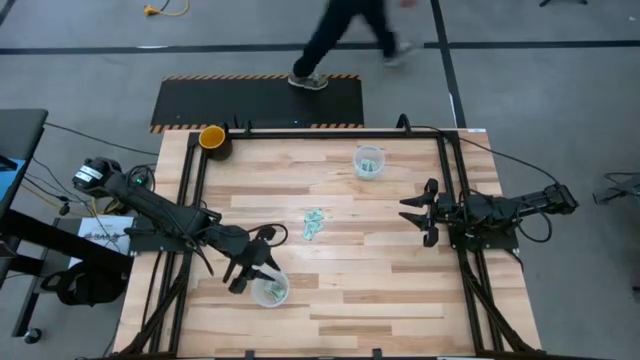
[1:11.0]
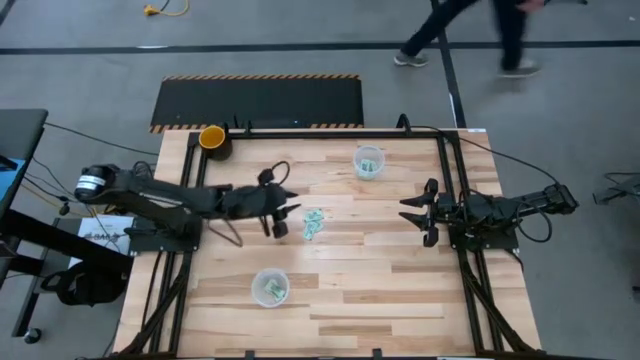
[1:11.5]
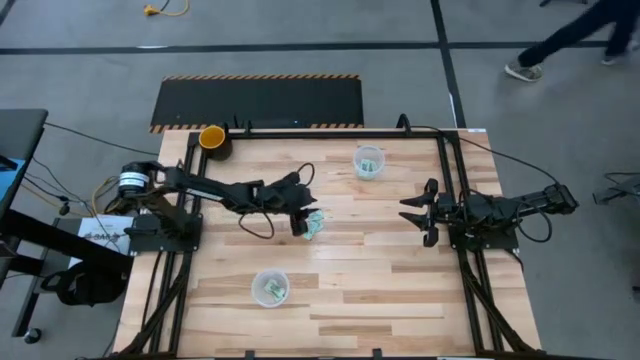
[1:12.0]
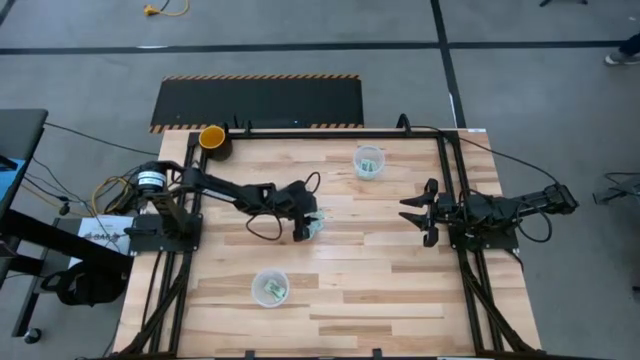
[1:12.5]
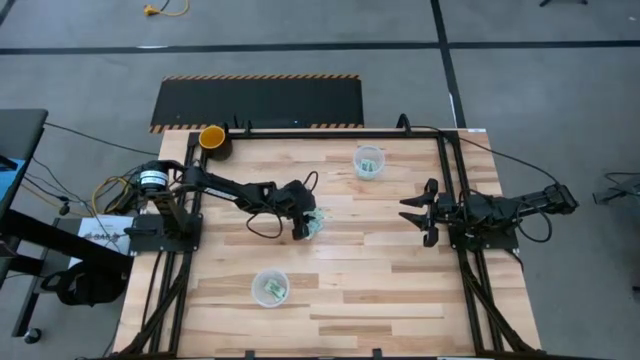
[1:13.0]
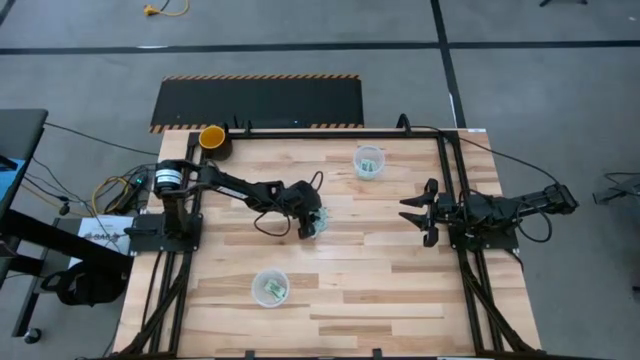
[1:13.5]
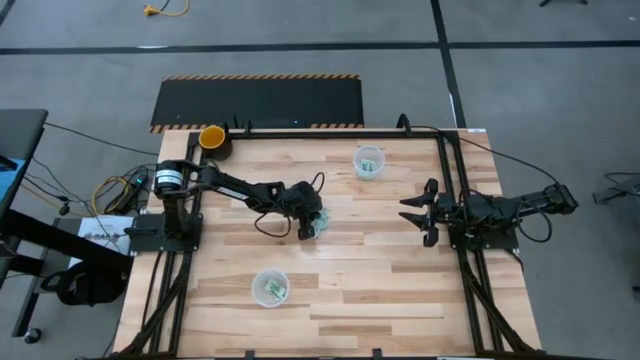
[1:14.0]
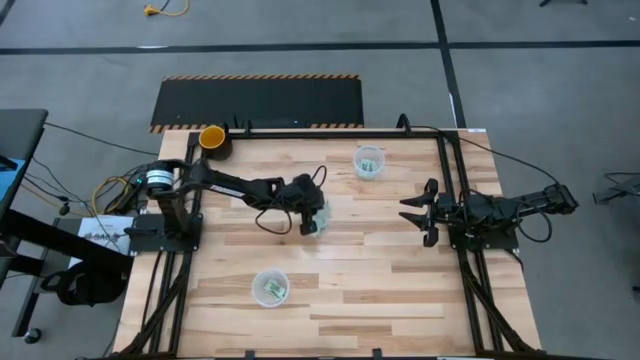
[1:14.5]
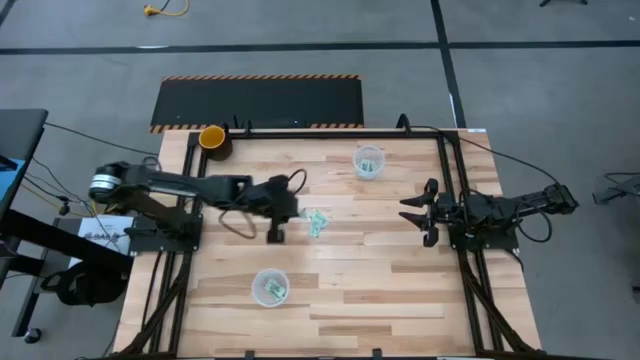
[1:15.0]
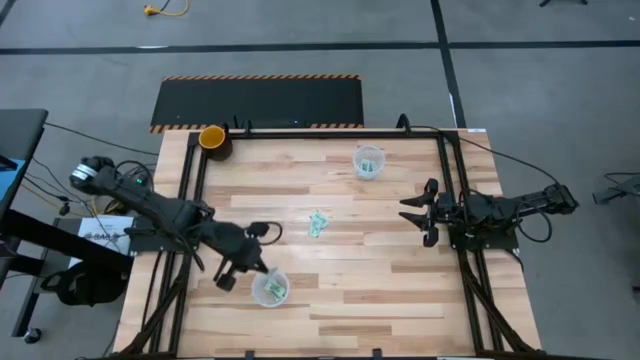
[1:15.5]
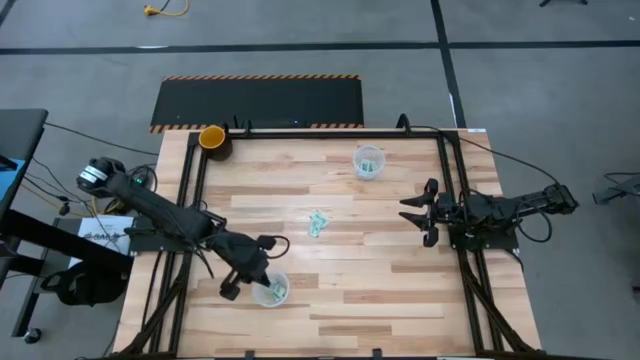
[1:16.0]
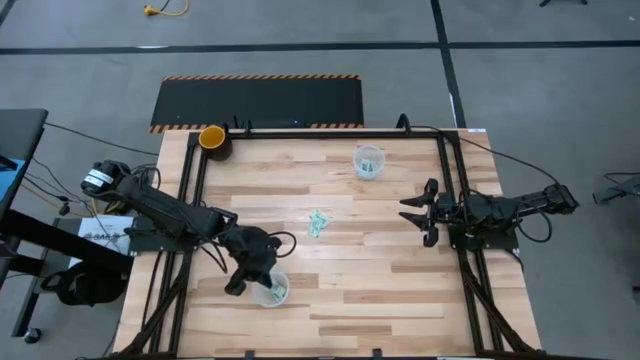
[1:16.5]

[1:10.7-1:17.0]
Task: Pick and place Stevia / Truvia into bins
Put the stevia packet into the bottom container

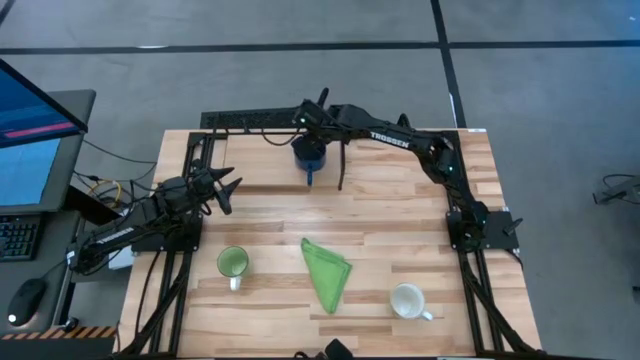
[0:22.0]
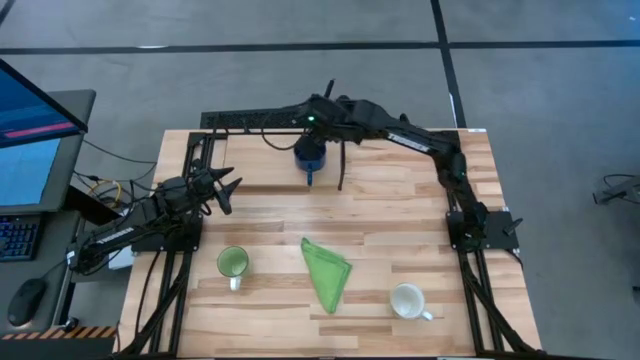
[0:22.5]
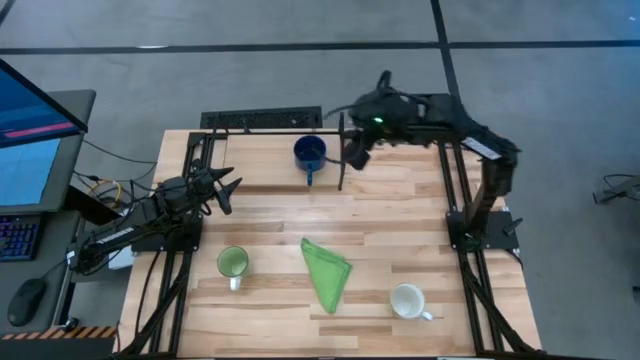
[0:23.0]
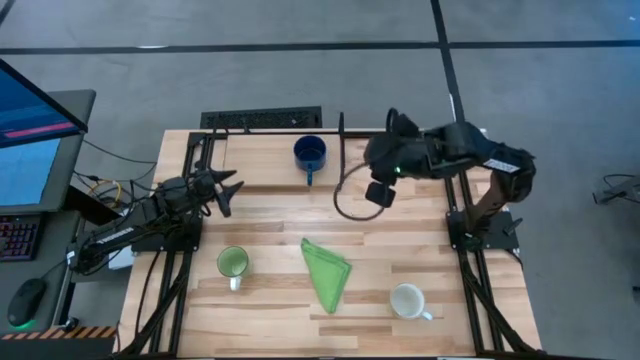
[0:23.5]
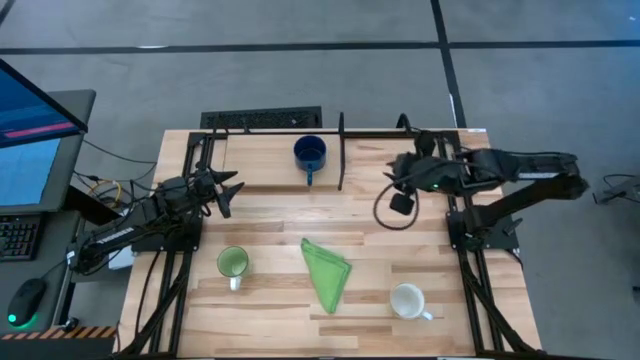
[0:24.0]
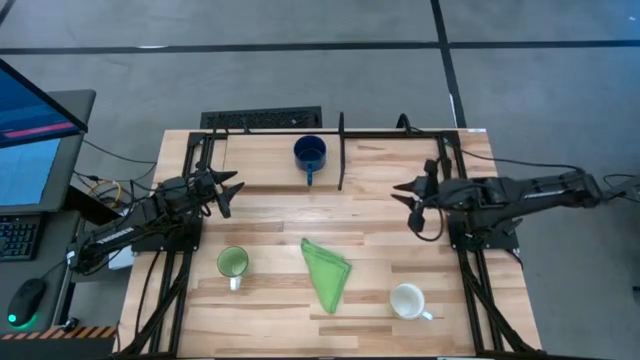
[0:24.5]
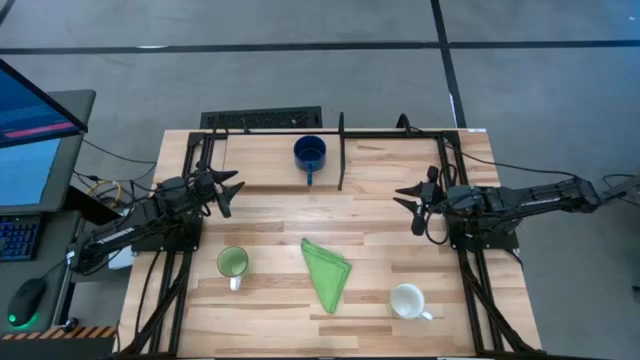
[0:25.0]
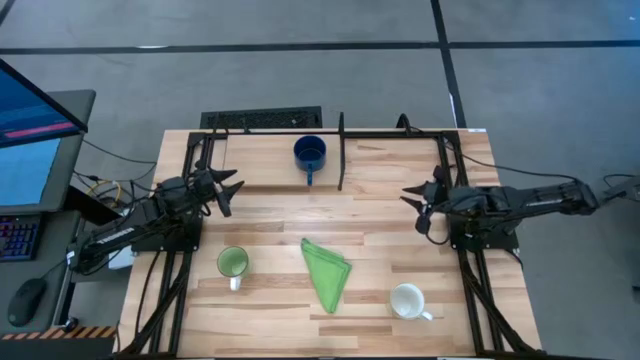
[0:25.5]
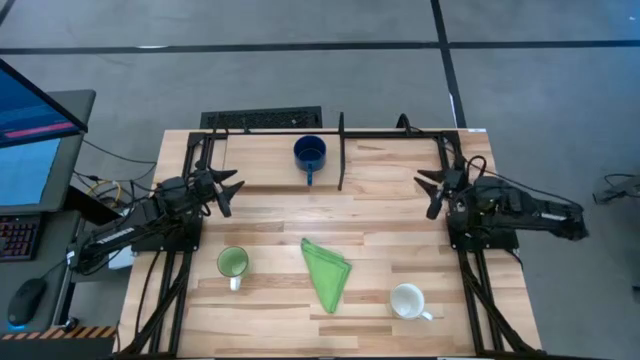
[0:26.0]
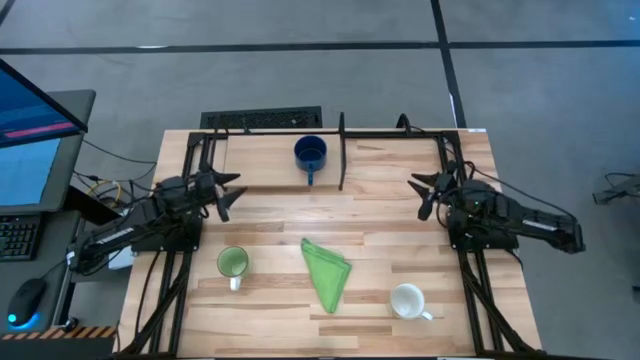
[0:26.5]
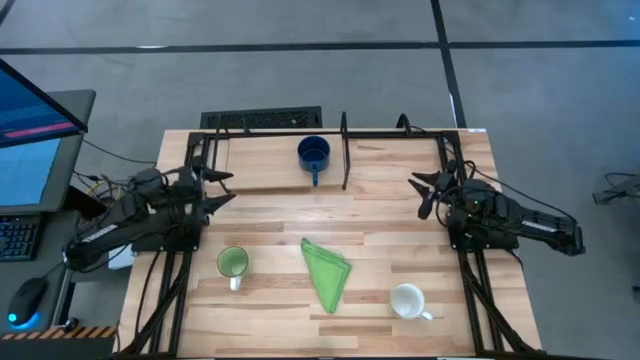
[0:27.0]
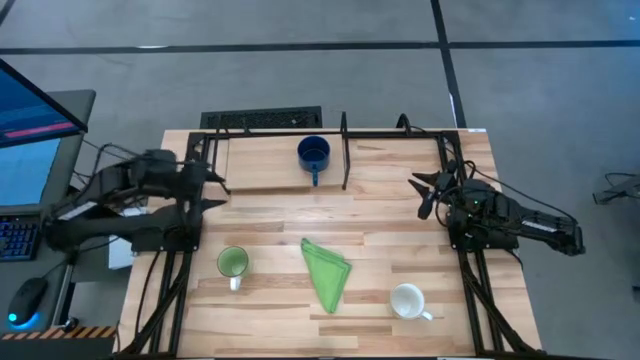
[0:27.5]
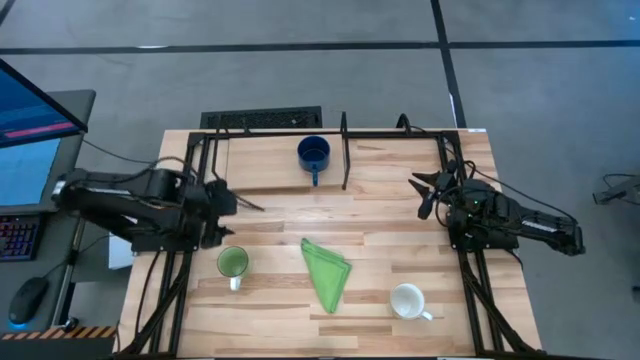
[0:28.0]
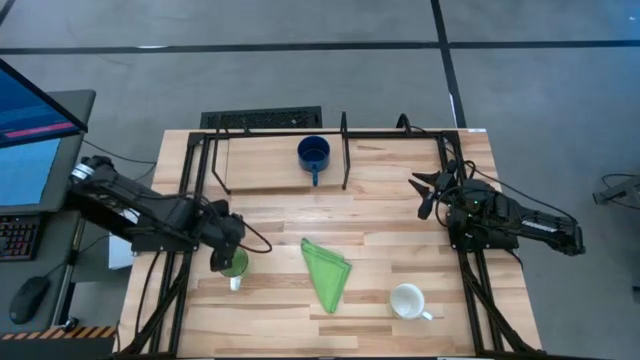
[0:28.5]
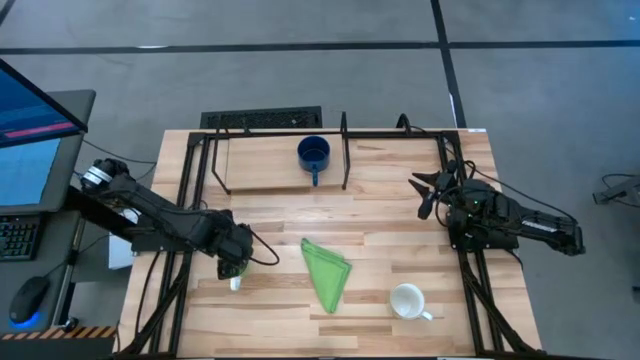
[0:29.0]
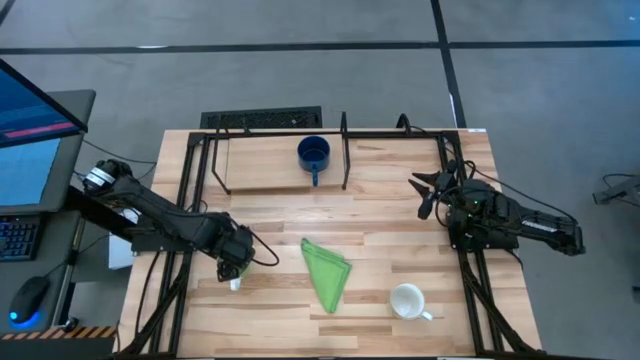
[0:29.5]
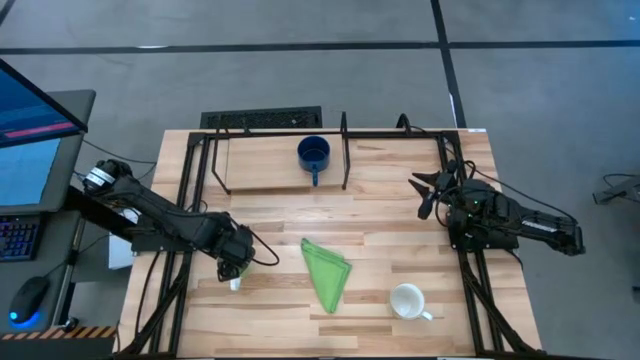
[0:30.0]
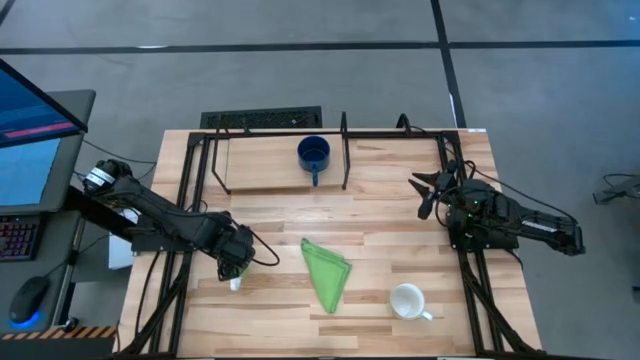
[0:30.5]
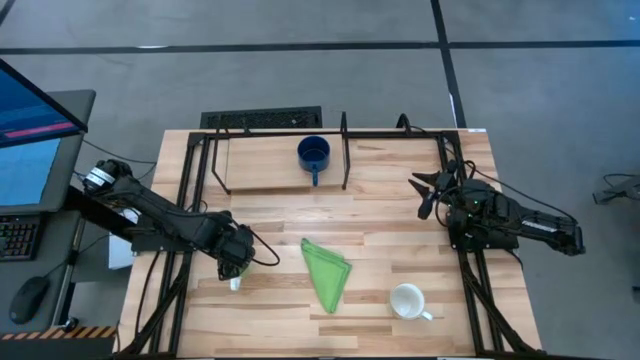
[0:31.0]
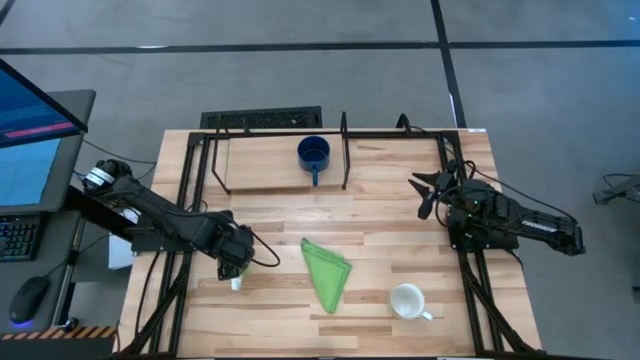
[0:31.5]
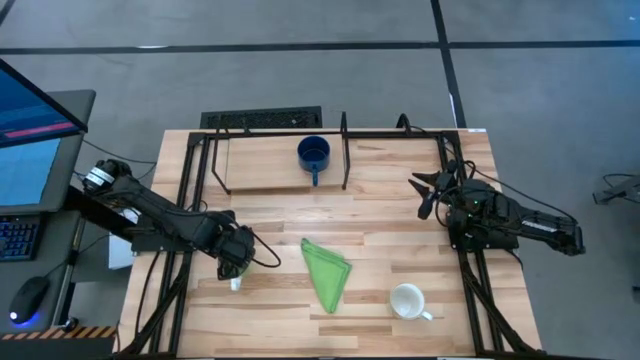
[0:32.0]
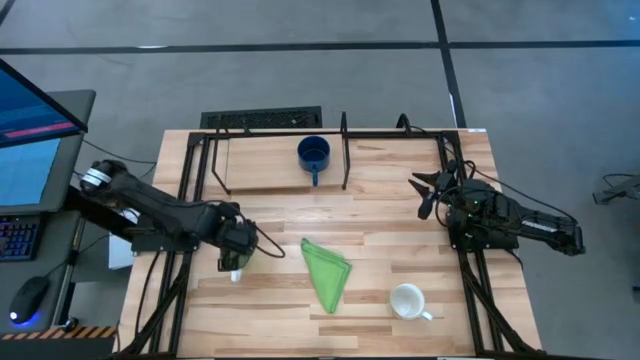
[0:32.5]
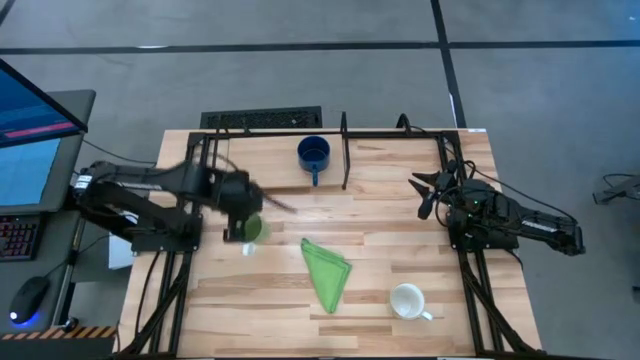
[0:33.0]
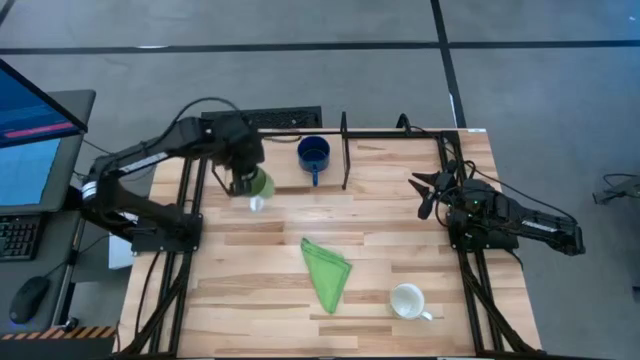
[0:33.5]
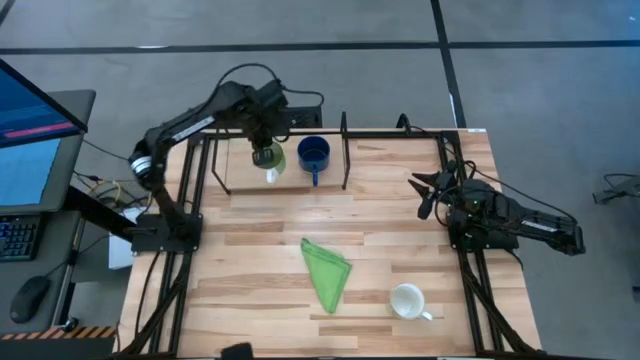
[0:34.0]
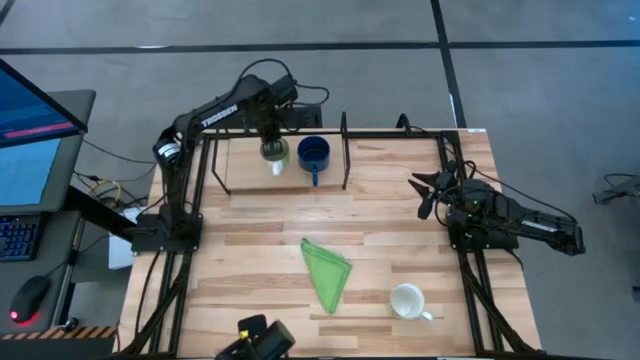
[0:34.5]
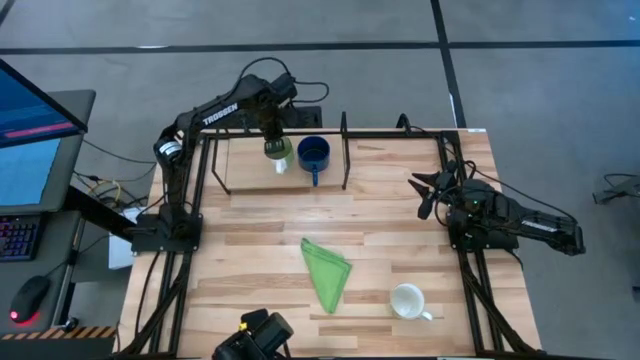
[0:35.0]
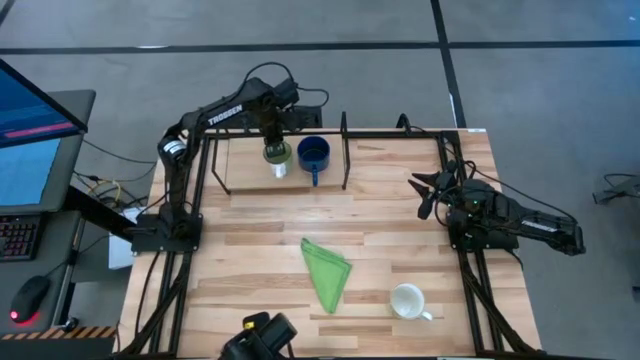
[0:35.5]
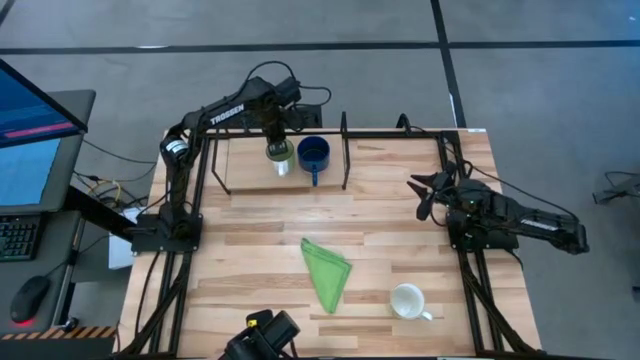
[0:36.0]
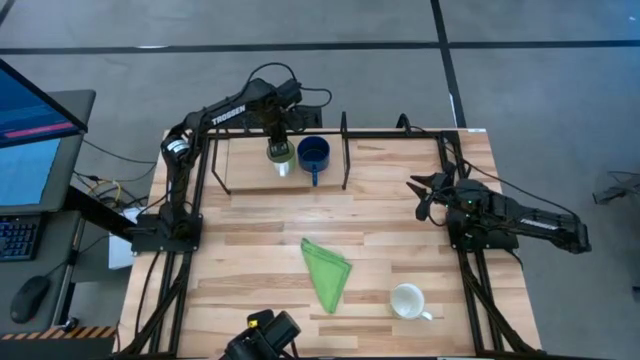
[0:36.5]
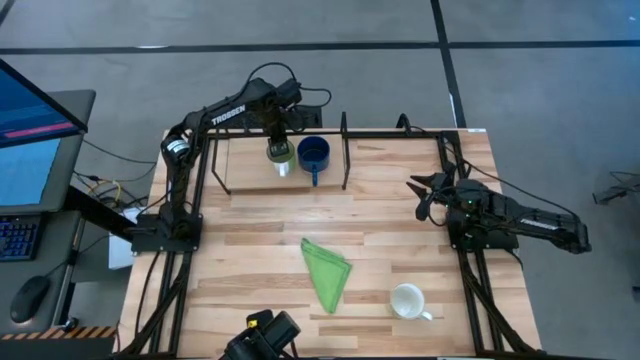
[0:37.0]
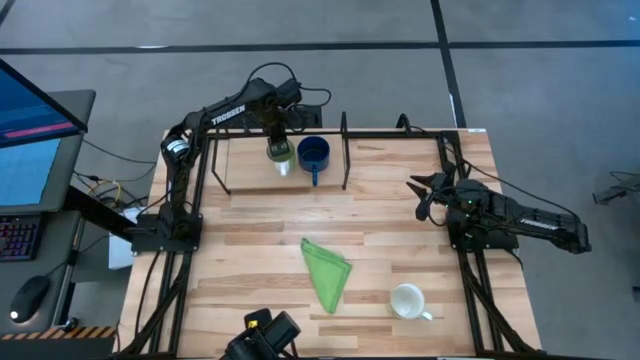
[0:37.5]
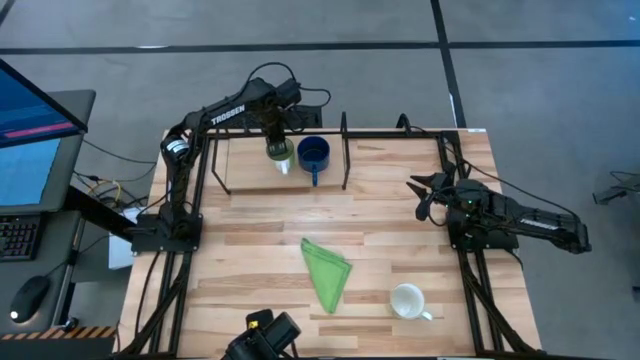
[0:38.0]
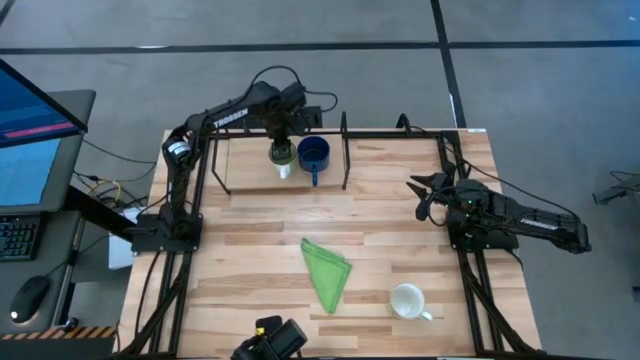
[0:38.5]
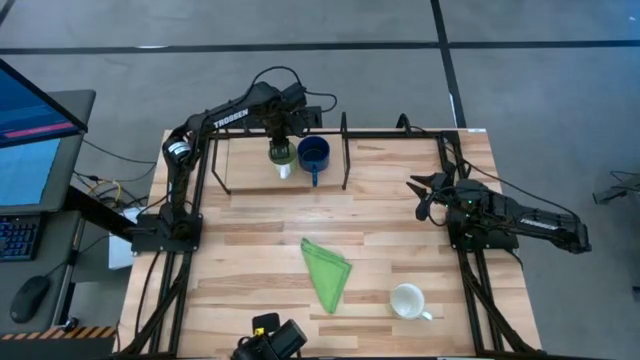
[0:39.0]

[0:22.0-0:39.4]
Task: Stack small to large cups/mugs on shelf
Put the green mug on the shelf
